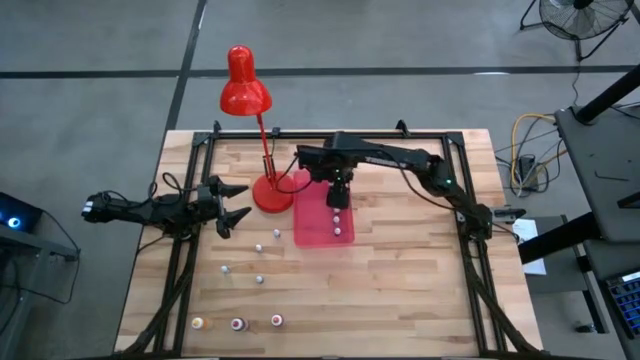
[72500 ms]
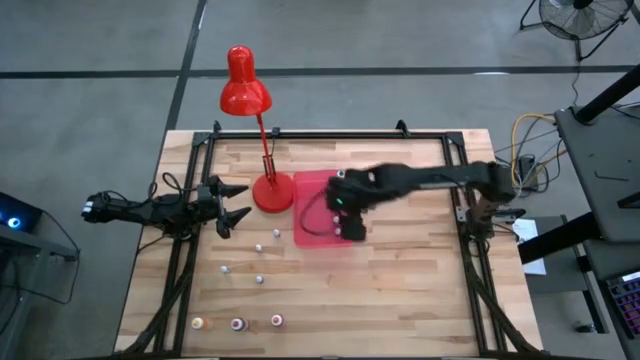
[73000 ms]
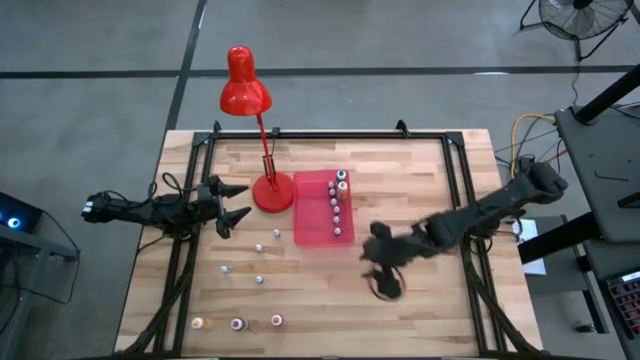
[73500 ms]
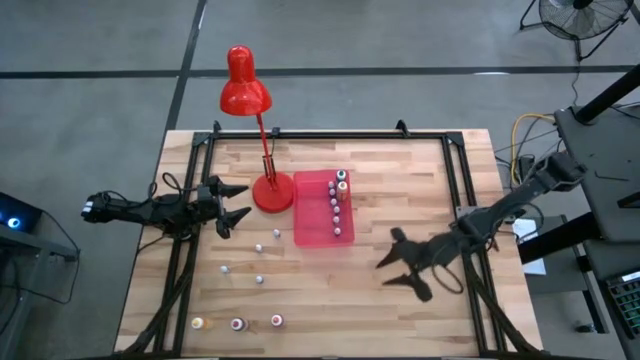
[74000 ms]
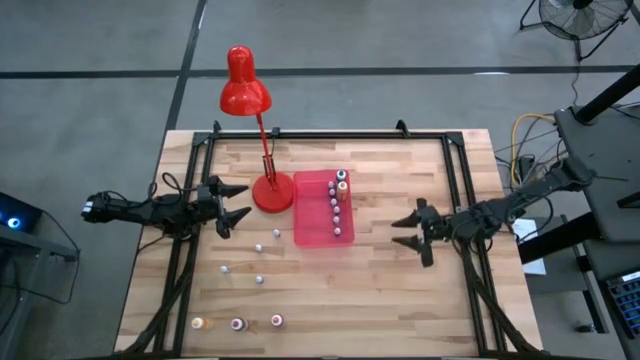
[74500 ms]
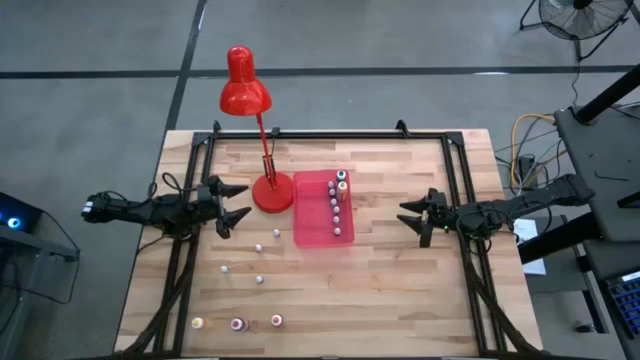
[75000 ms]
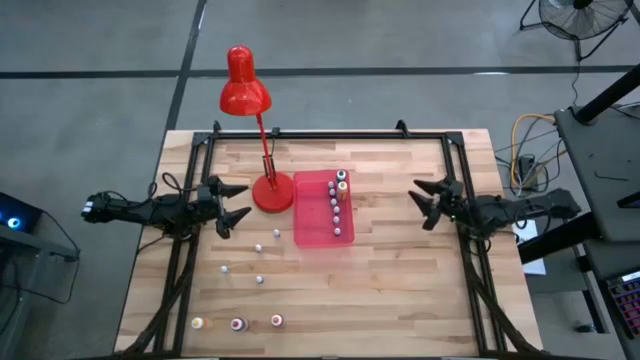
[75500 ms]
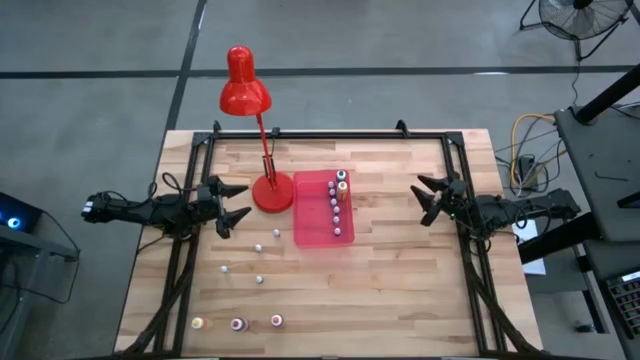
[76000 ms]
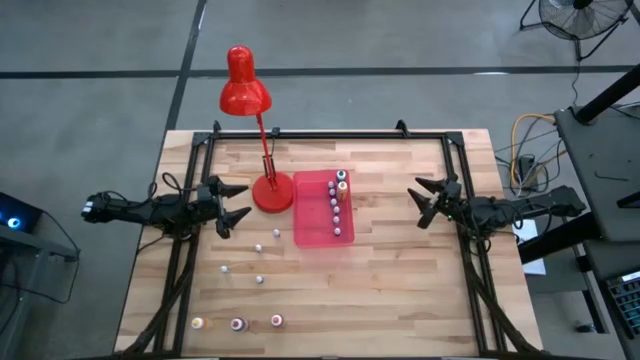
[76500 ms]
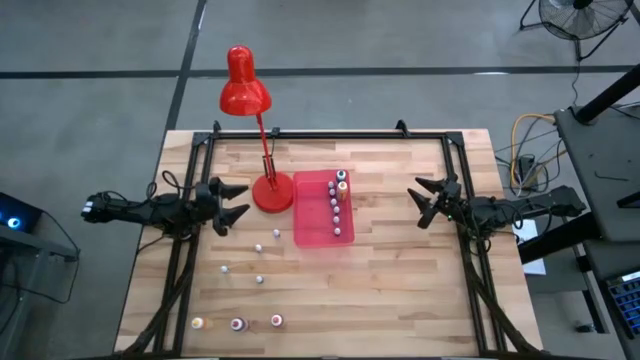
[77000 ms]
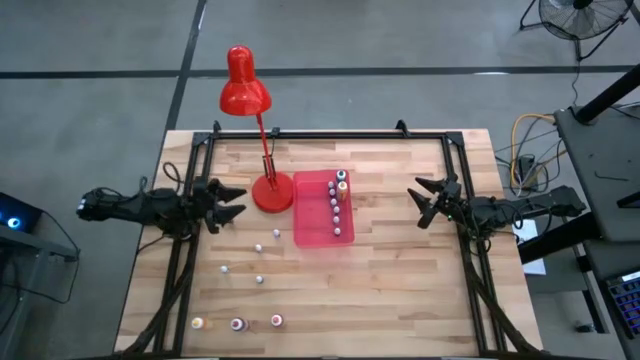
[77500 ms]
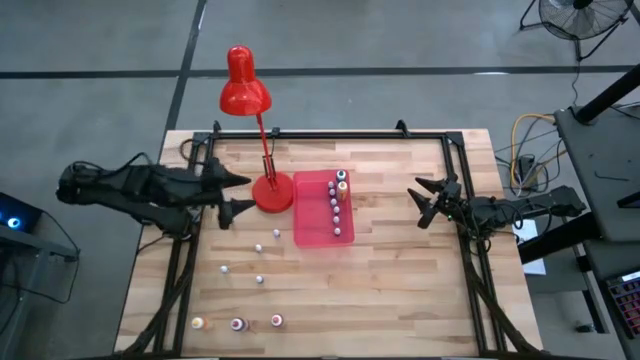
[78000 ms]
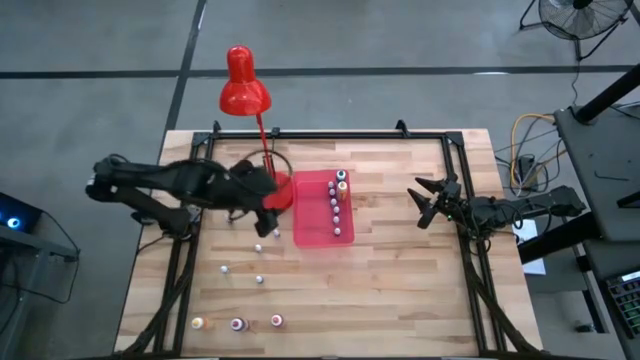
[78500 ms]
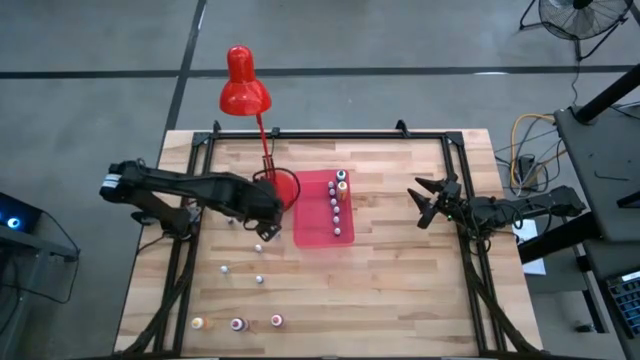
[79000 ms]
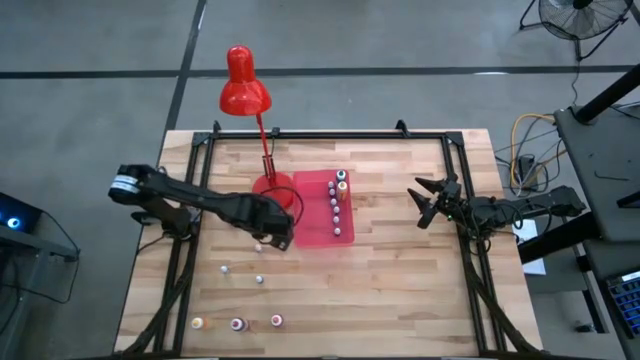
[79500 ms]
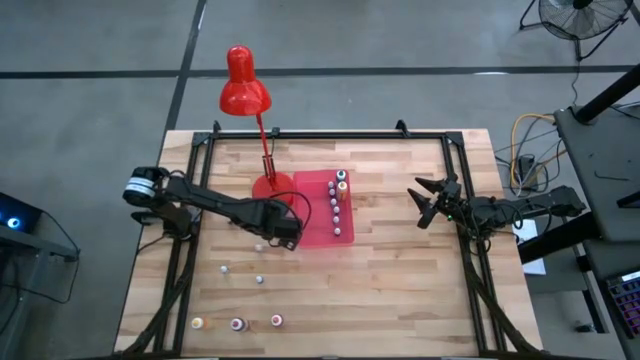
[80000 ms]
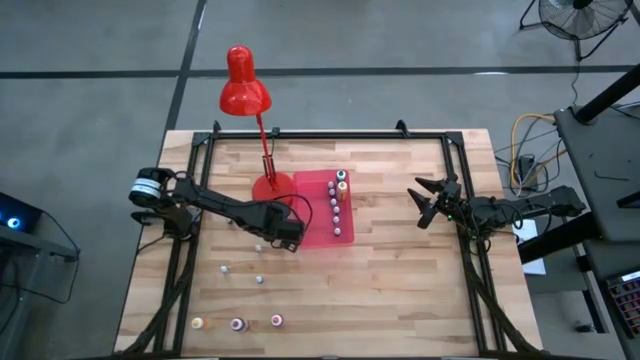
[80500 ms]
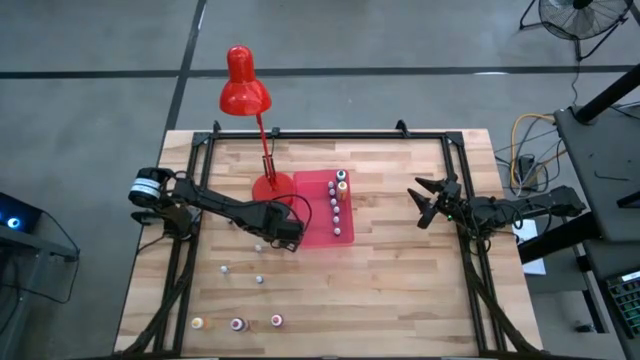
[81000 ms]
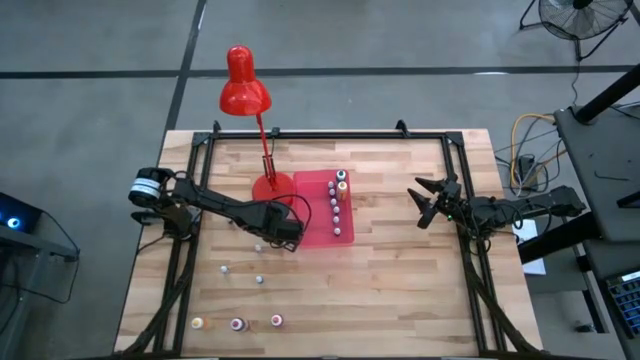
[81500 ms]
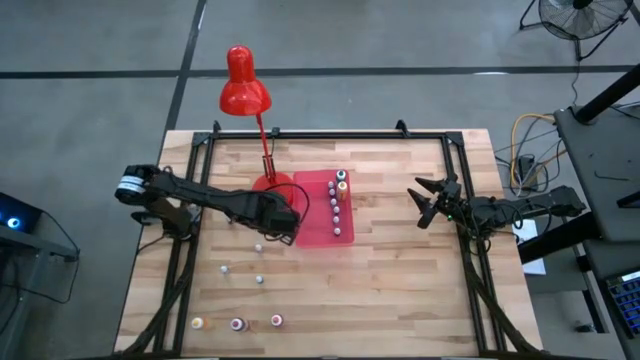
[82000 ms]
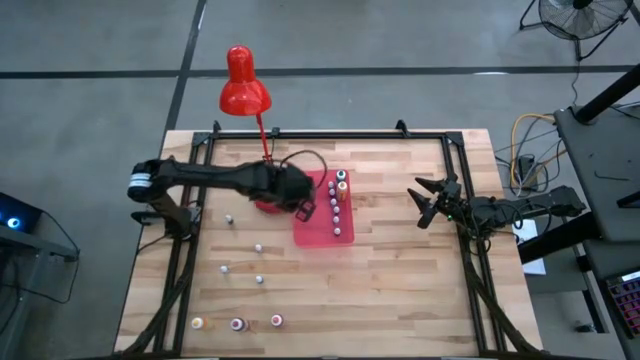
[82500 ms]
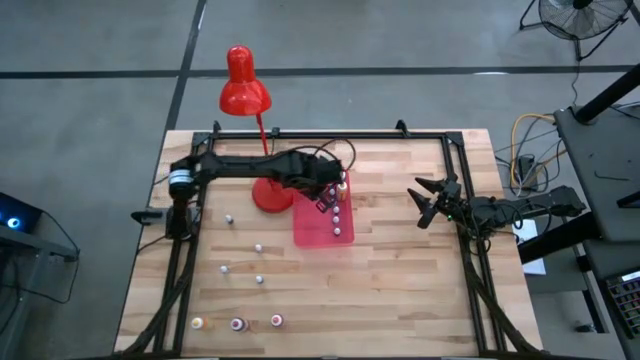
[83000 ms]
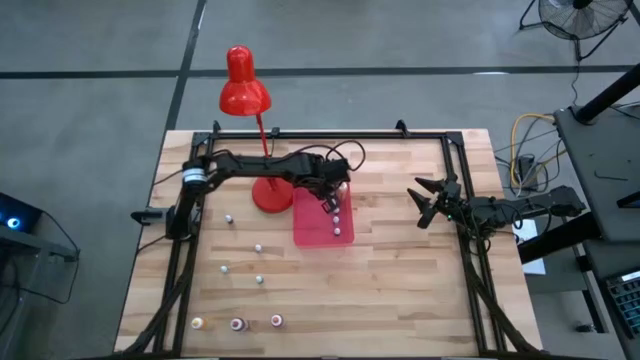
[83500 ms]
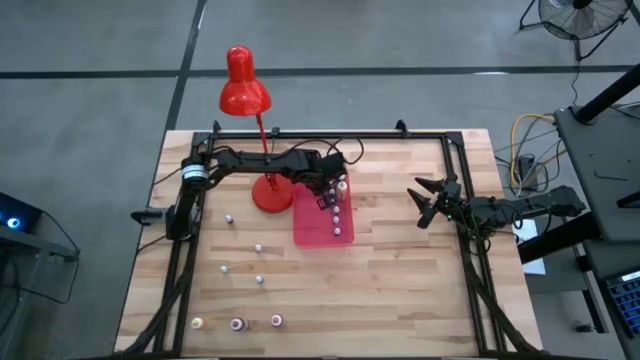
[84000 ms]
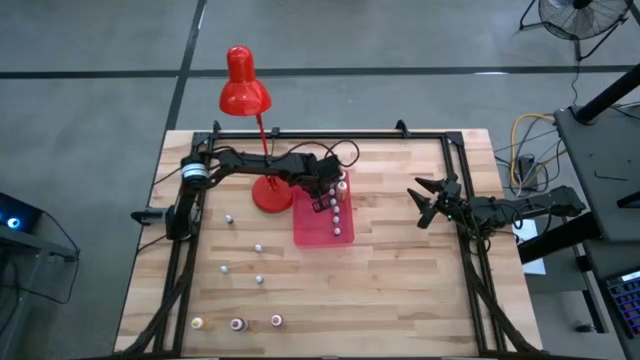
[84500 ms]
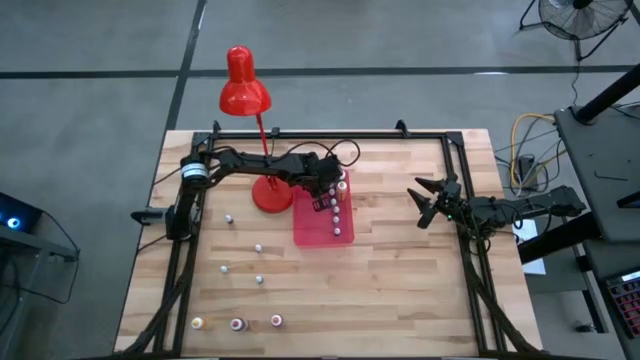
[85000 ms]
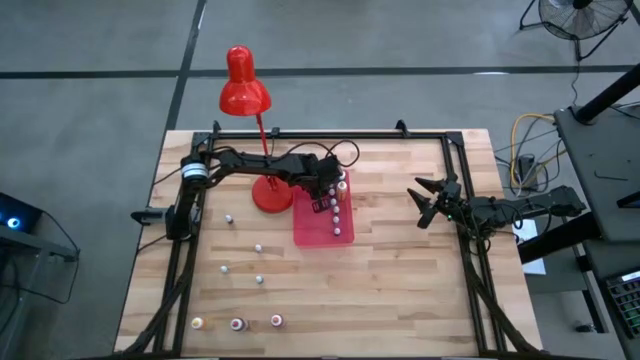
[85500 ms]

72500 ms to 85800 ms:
Task: Pick & Place food coloring
Put the small black food coloring bottle into the bin

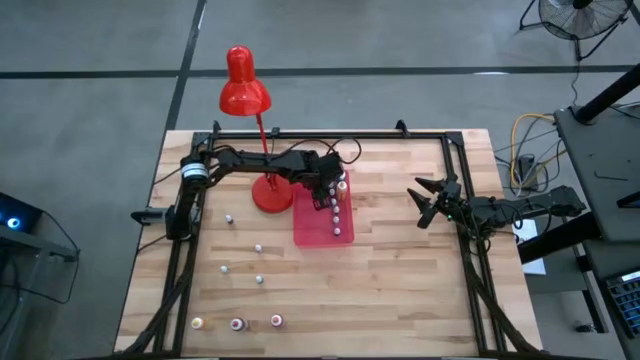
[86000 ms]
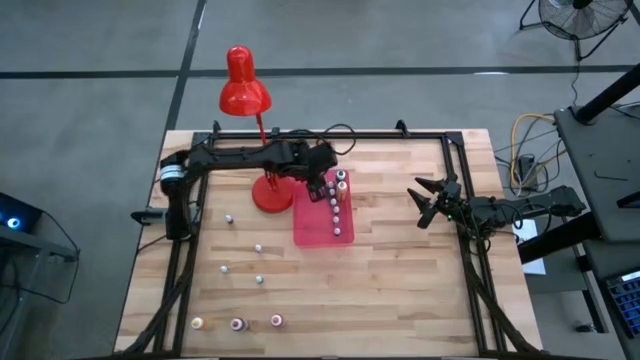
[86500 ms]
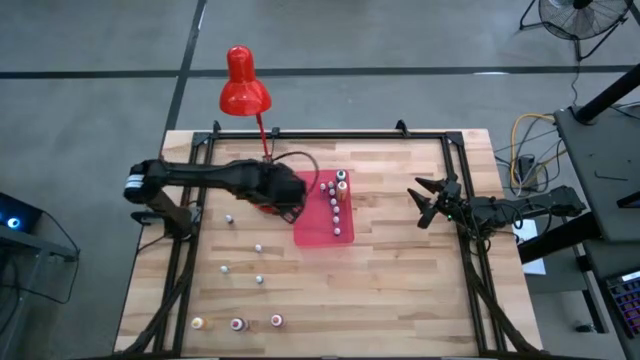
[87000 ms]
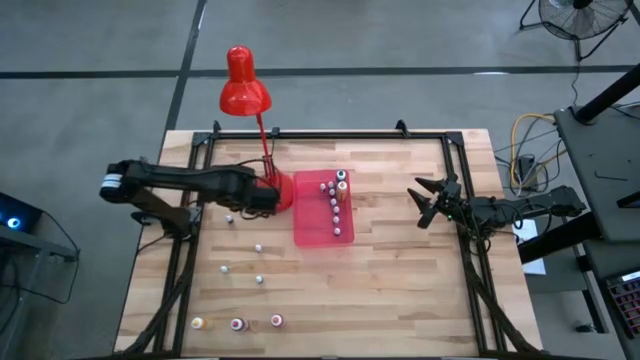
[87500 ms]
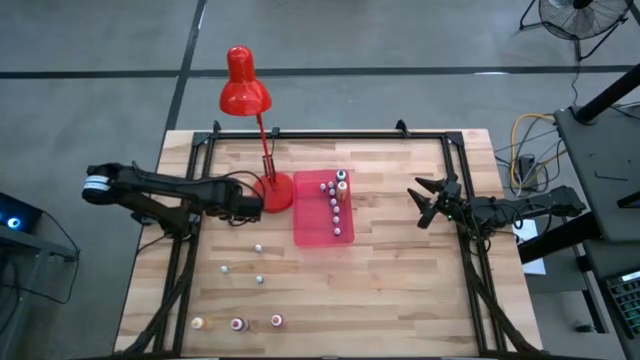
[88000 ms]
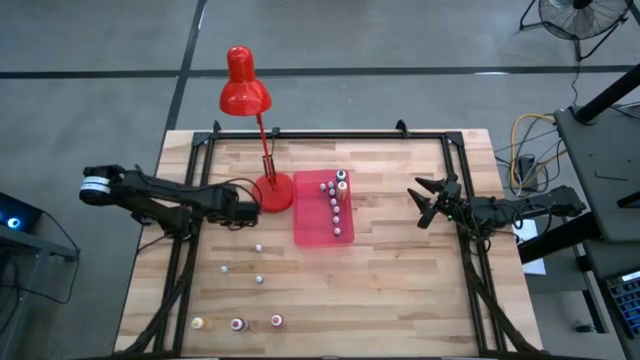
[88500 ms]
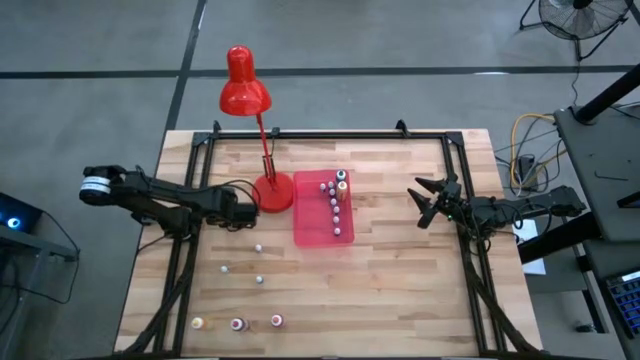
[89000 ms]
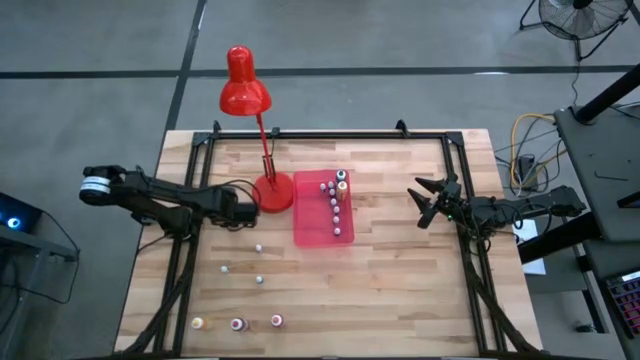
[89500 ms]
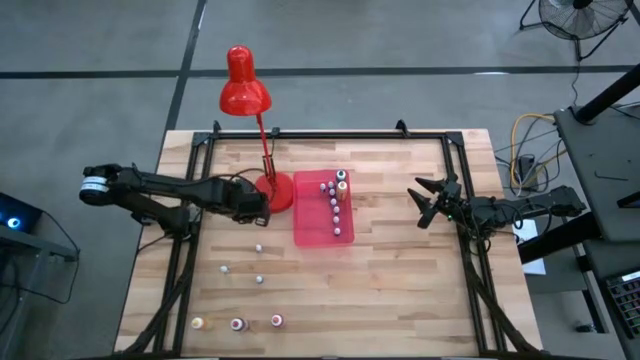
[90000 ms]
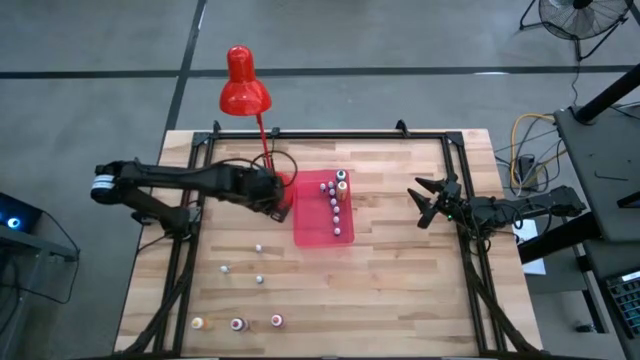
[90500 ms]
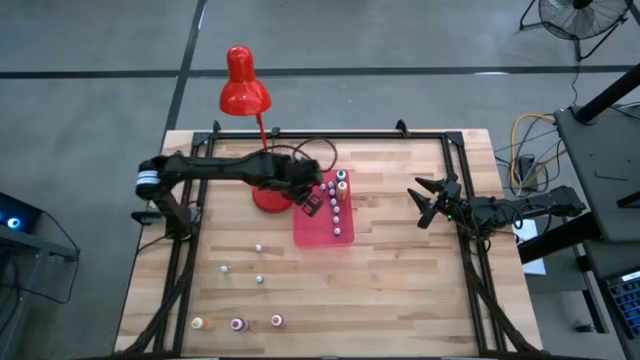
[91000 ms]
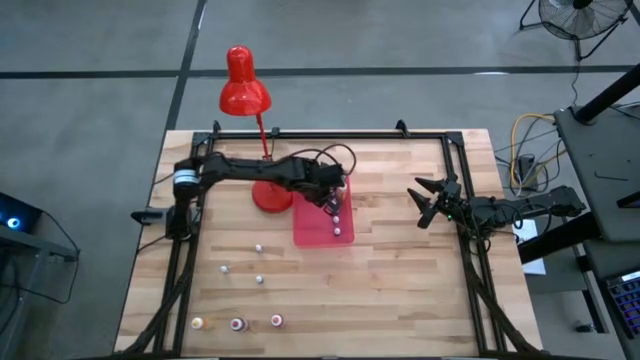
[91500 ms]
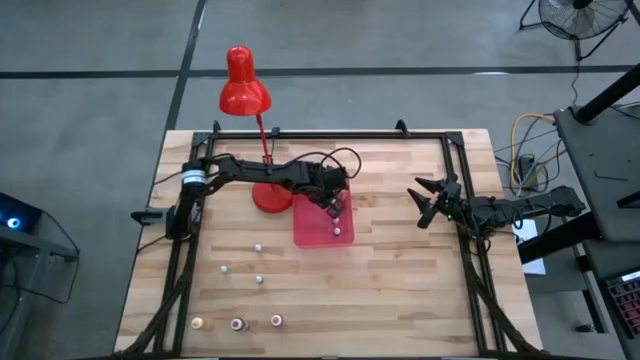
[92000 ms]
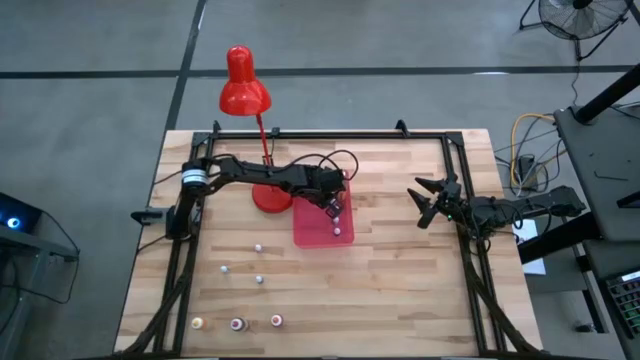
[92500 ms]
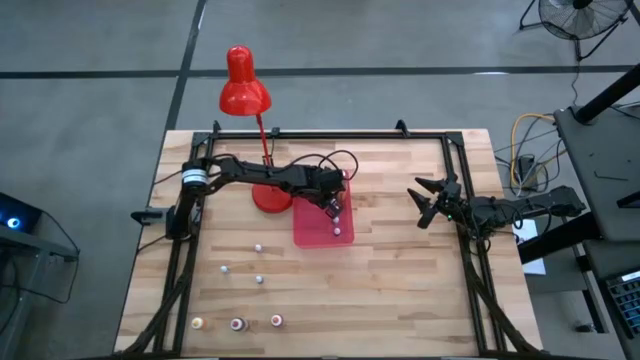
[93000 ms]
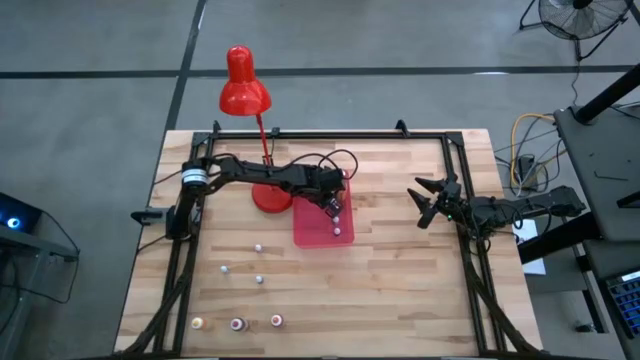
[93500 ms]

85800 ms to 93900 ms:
Put the small black food coloring bottle into the bin
